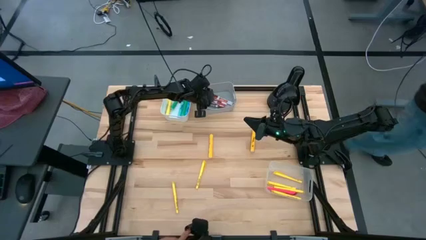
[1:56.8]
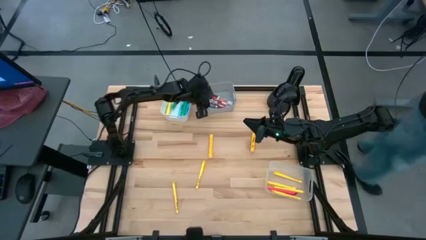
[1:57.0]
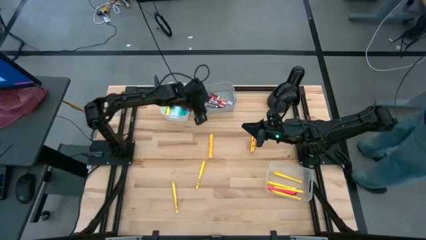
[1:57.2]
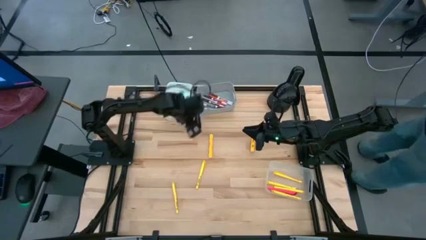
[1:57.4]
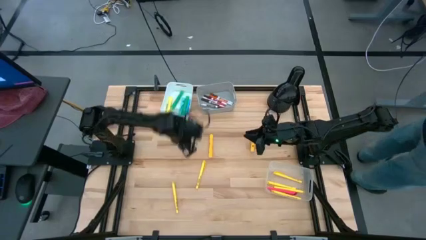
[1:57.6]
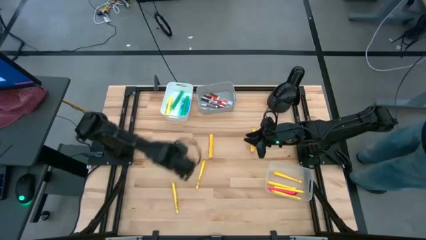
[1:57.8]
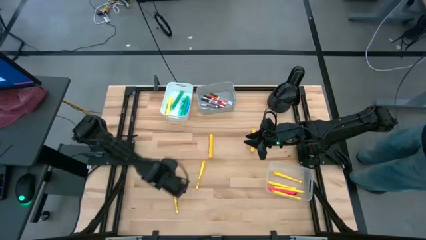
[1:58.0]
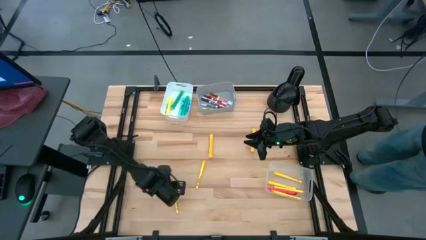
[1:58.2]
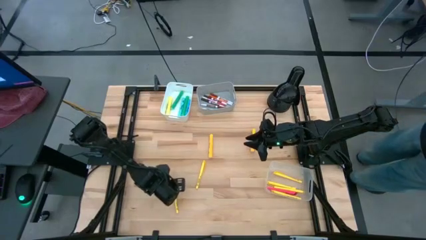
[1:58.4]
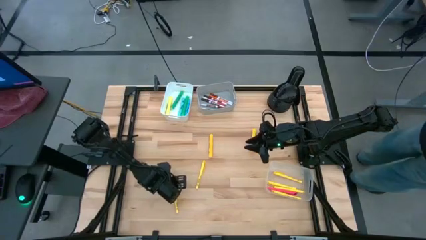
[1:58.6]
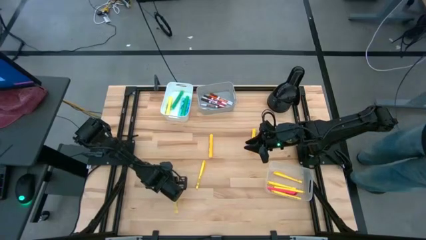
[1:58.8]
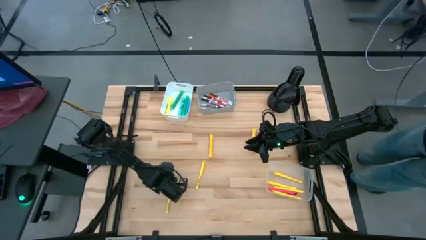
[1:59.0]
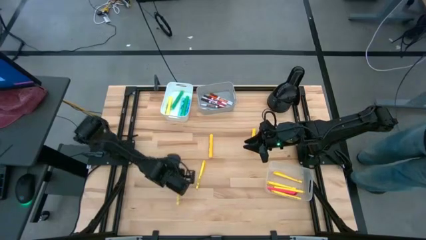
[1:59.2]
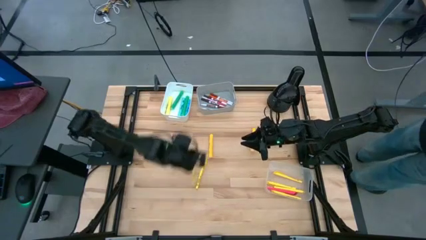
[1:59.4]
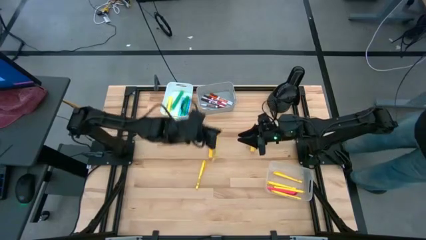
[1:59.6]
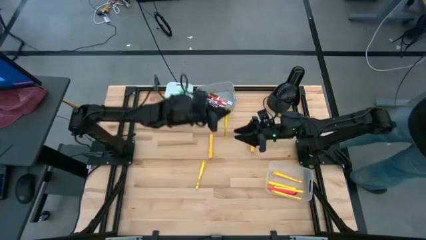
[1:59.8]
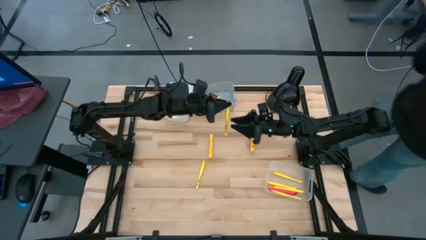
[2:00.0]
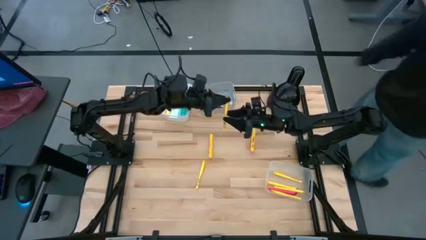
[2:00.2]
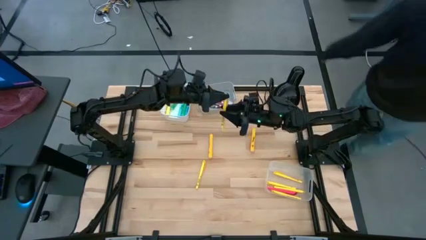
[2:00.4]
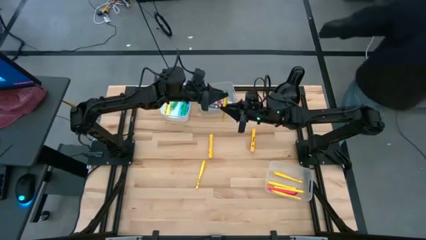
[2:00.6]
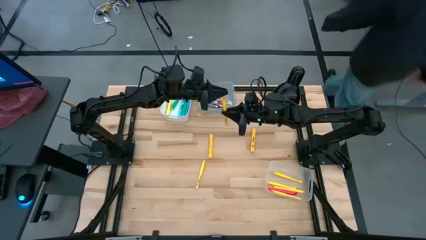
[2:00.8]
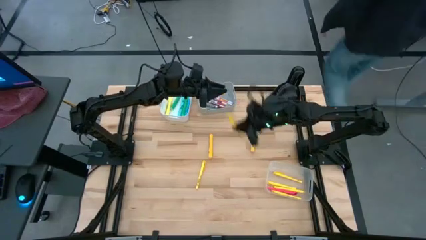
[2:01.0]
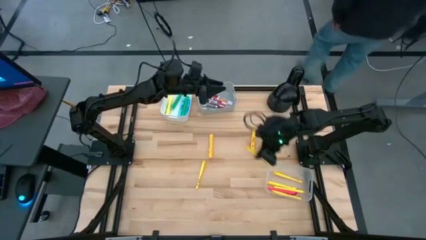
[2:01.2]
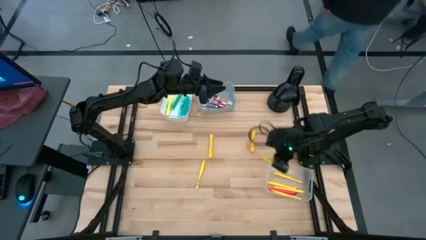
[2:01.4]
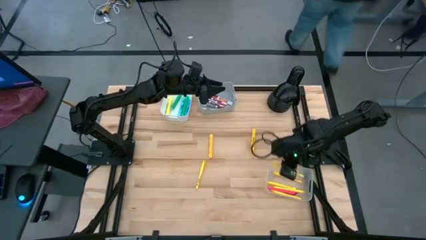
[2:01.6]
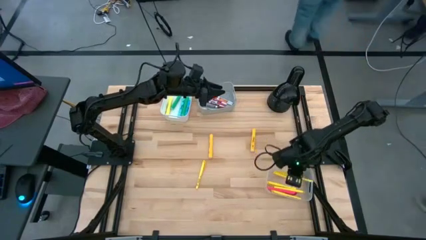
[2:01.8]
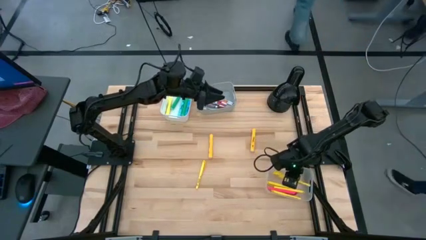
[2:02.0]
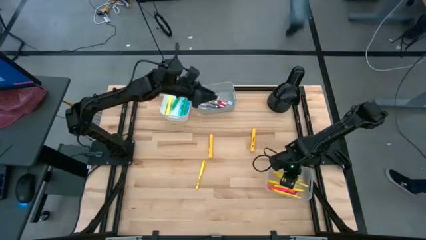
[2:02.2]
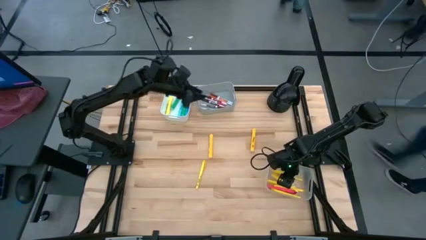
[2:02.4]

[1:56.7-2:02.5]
Task: Pick & Place Markers
Put the yellow pen into the transparent bin

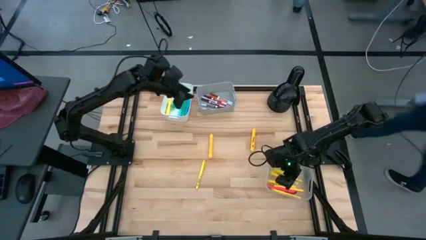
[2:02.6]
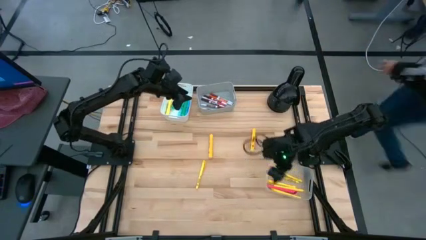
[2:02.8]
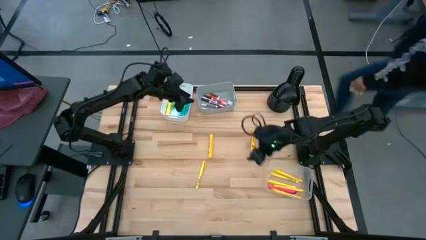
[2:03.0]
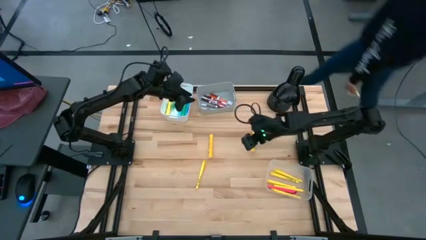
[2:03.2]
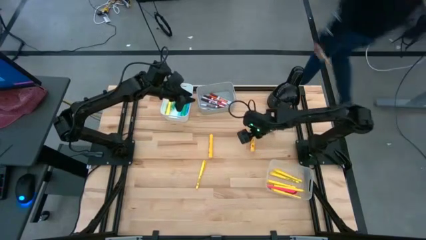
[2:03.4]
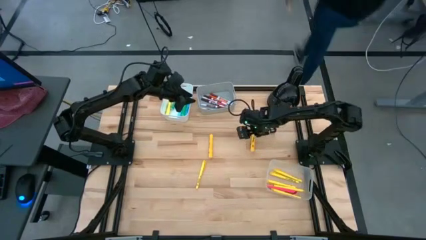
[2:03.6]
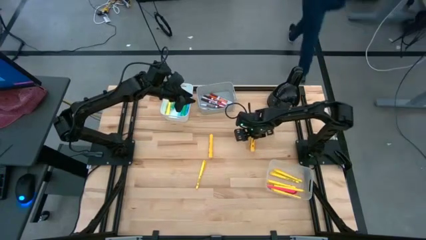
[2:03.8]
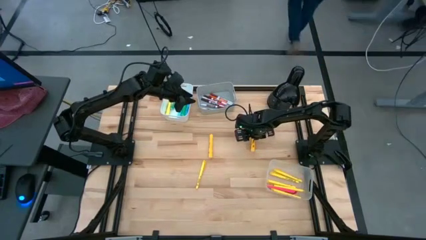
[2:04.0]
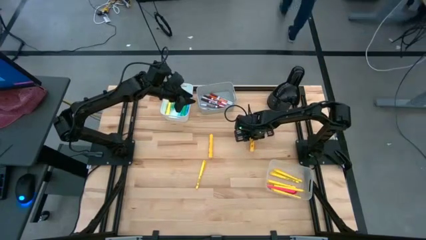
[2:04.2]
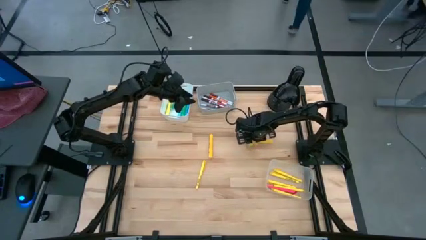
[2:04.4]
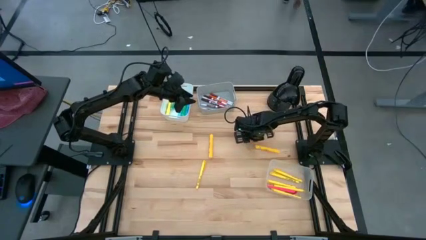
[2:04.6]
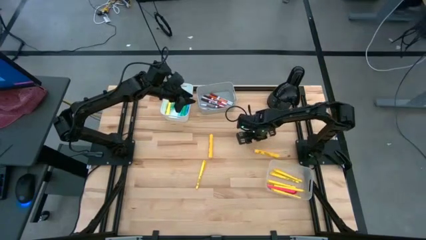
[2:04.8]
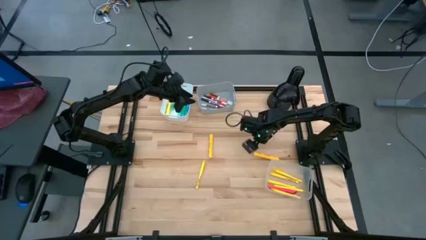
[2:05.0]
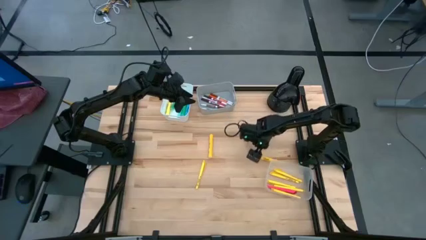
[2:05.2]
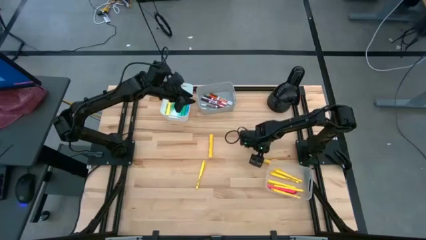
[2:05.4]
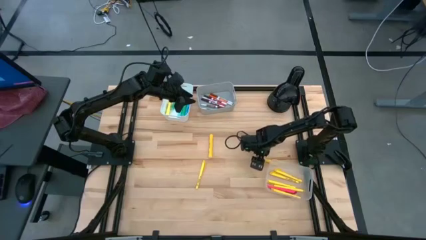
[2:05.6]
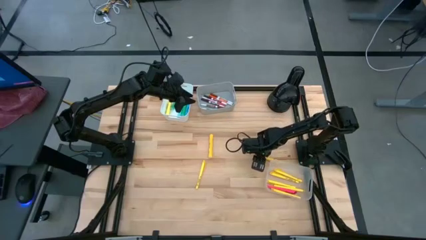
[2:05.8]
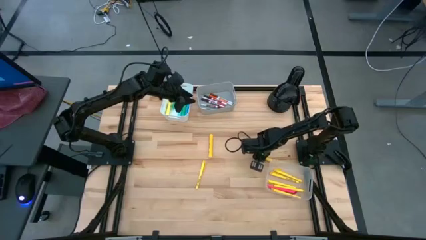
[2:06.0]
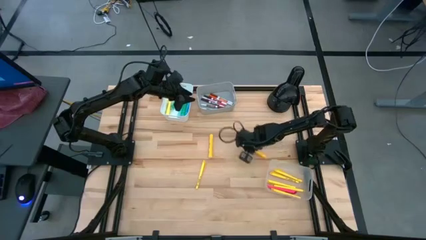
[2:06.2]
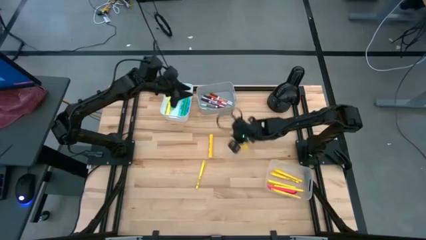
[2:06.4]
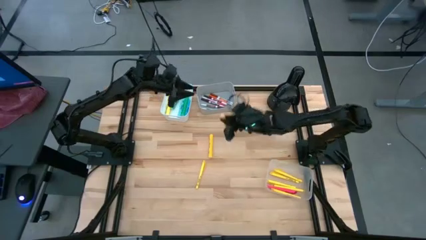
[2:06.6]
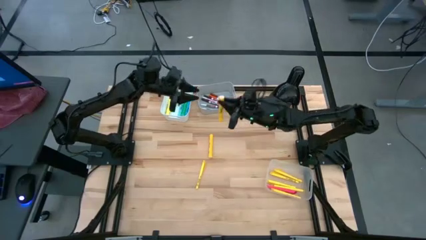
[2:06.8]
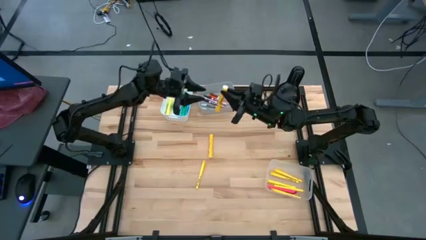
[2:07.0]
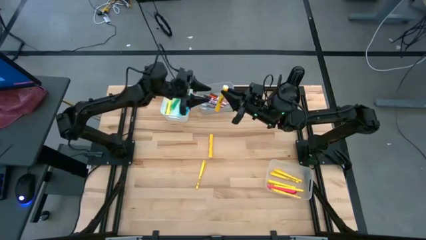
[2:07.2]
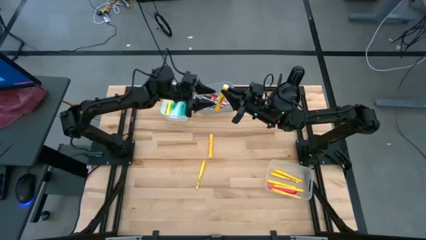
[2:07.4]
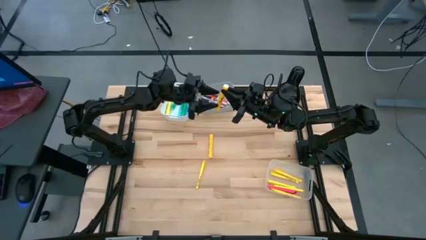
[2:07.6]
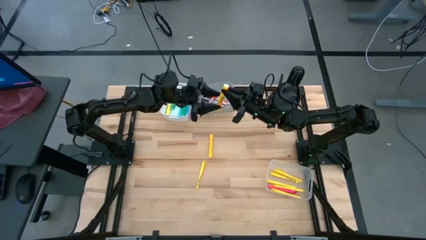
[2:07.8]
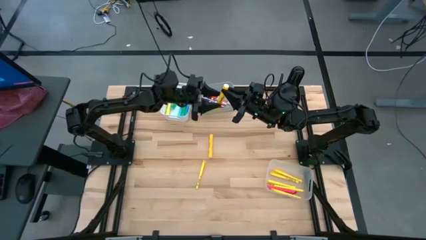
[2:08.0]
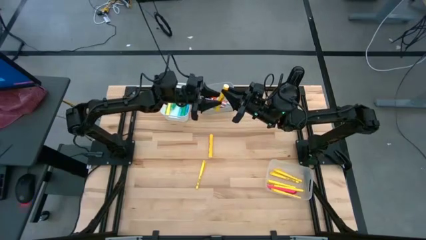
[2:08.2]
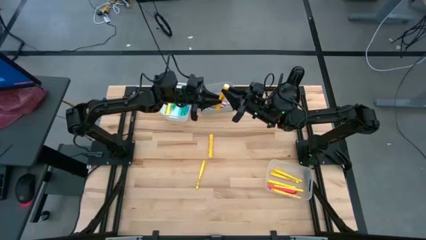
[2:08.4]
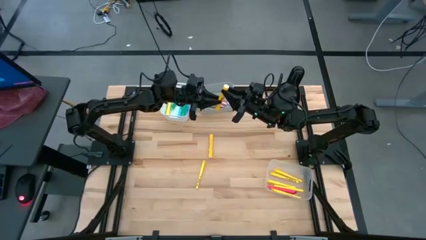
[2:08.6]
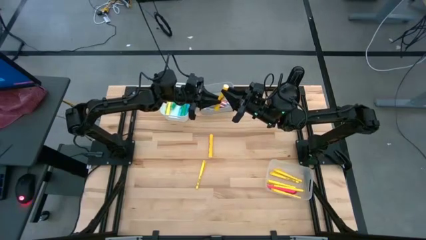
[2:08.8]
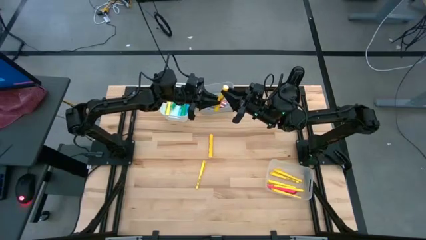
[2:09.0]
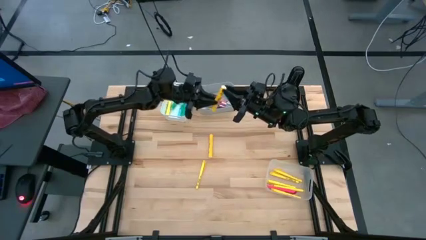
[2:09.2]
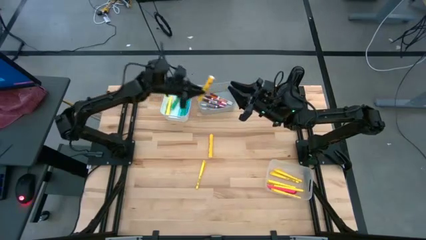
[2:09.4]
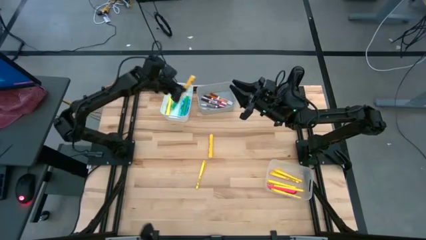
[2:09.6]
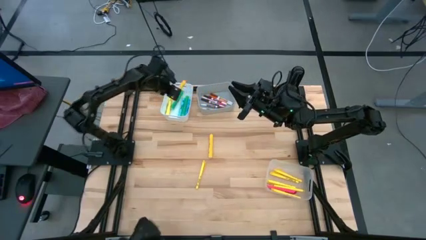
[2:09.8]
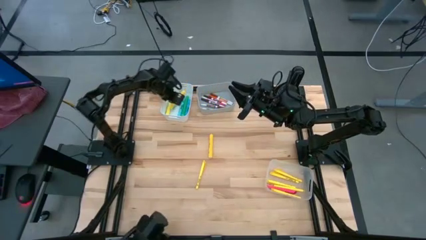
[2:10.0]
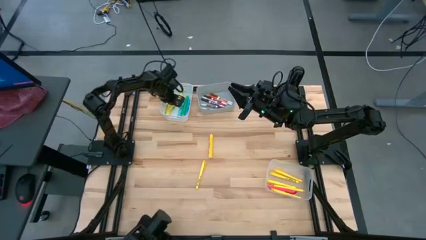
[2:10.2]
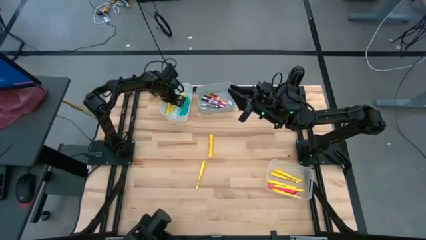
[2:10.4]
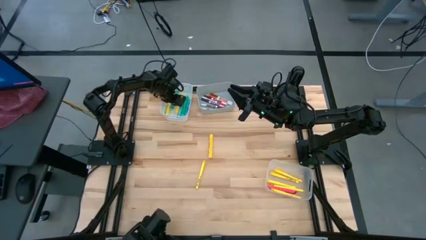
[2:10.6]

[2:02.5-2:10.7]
Put the dark yellow highlighter pen into the white bin

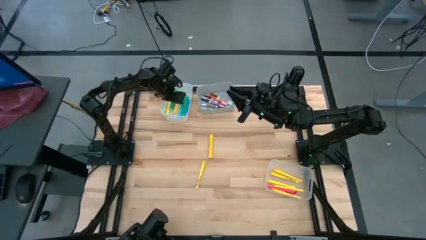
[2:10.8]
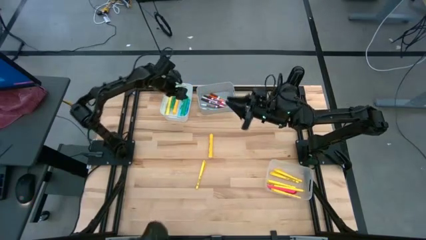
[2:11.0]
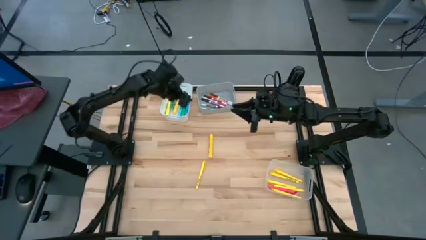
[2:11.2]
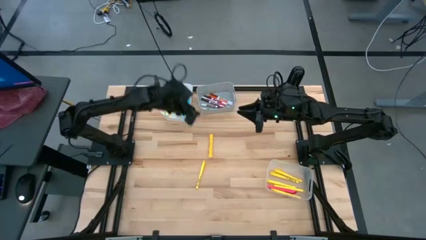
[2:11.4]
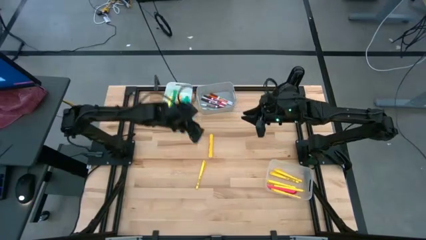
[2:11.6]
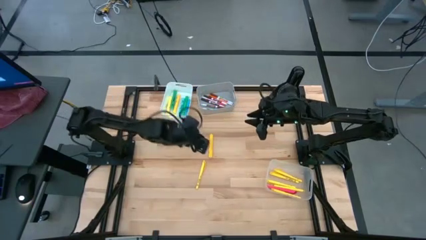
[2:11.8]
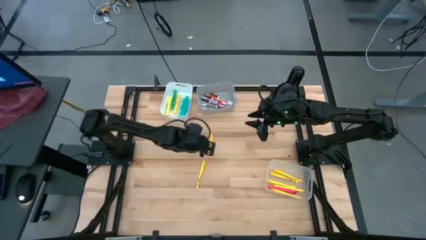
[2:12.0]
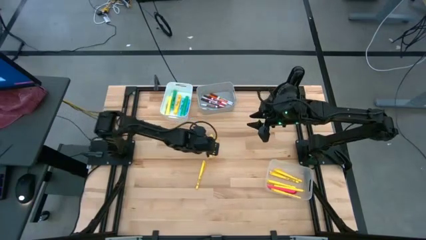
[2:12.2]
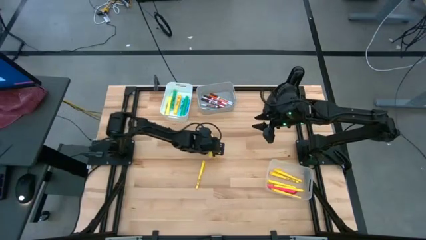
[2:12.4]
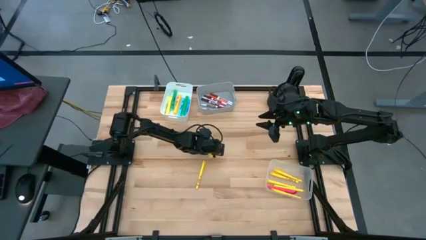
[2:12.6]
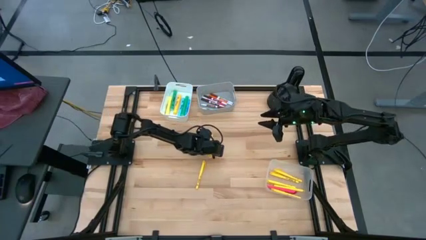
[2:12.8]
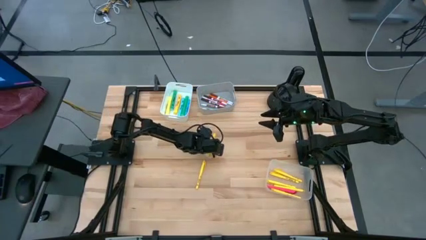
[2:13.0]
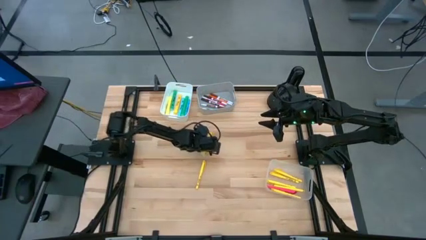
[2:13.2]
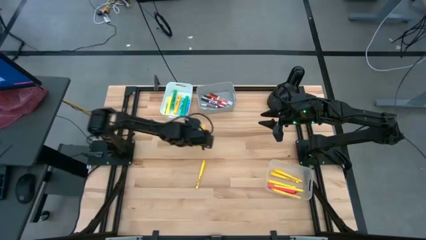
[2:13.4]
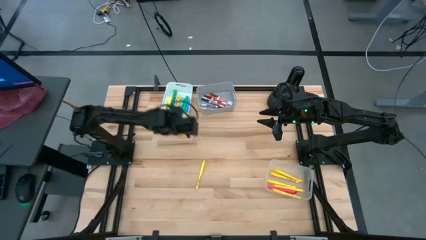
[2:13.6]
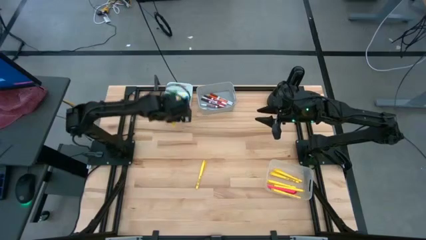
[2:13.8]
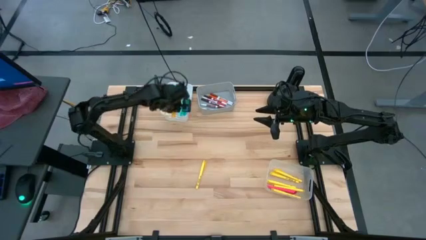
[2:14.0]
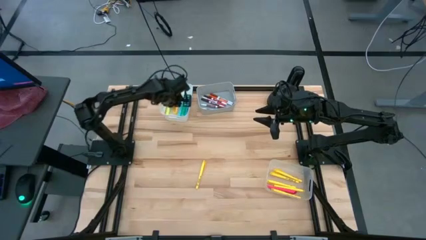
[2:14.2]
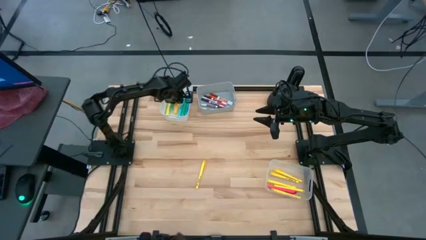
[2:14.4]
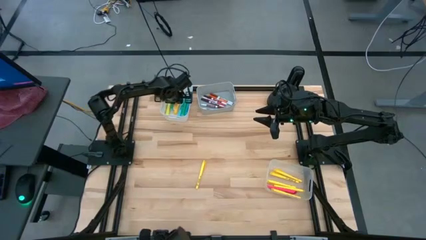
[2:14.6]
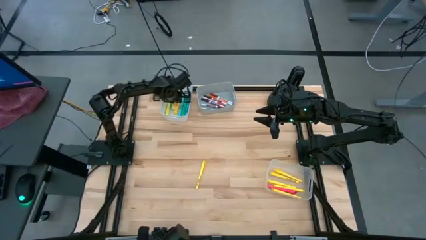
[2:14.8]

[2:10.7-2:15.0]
Put the dark yellow highlighter pen into the white bin
